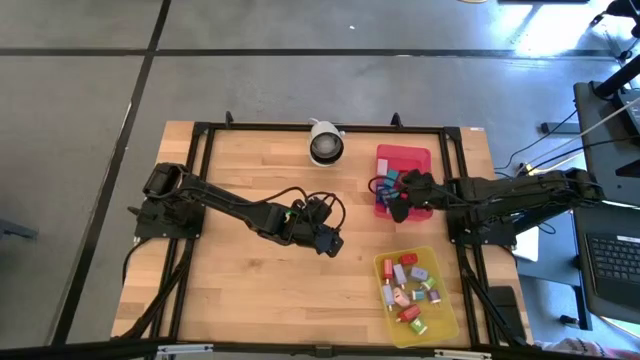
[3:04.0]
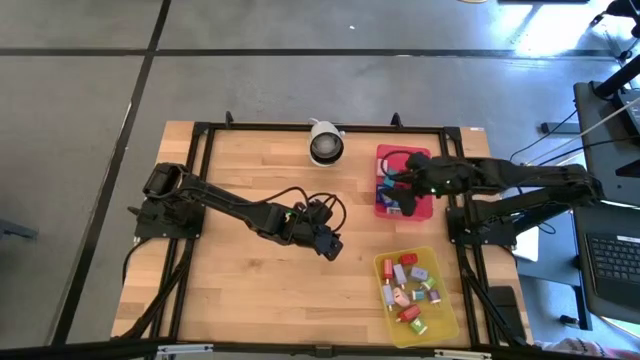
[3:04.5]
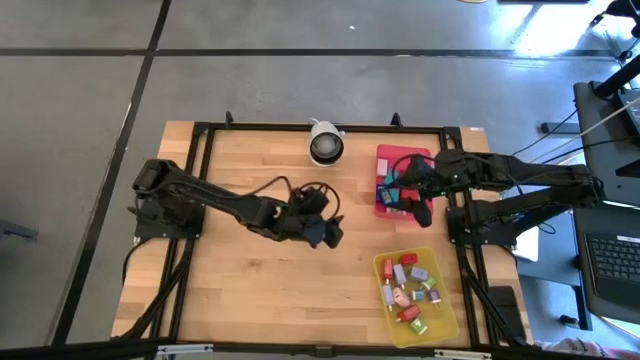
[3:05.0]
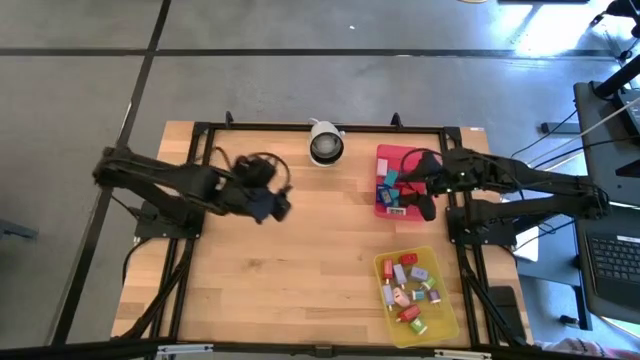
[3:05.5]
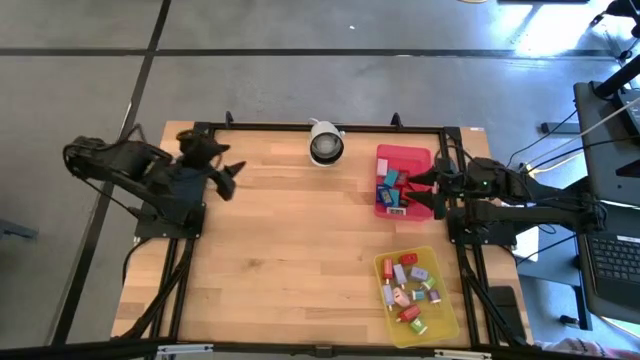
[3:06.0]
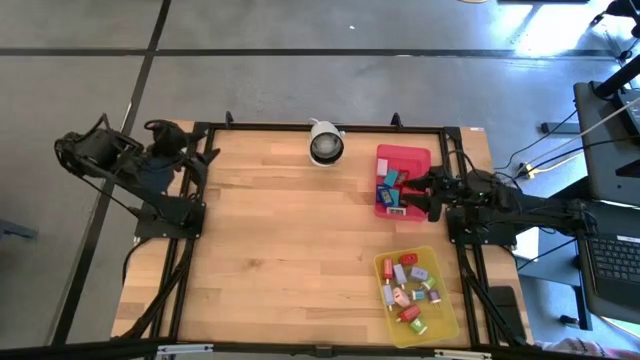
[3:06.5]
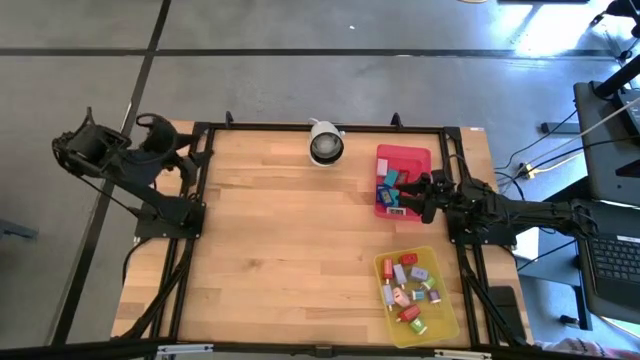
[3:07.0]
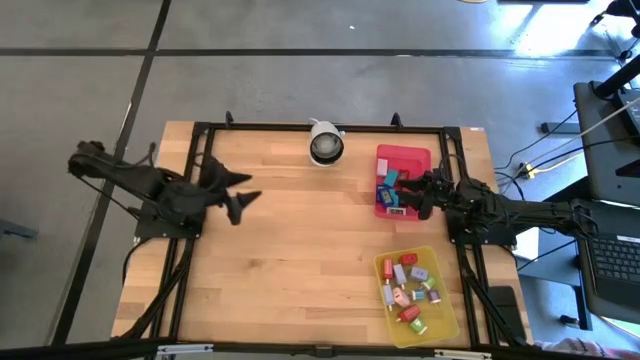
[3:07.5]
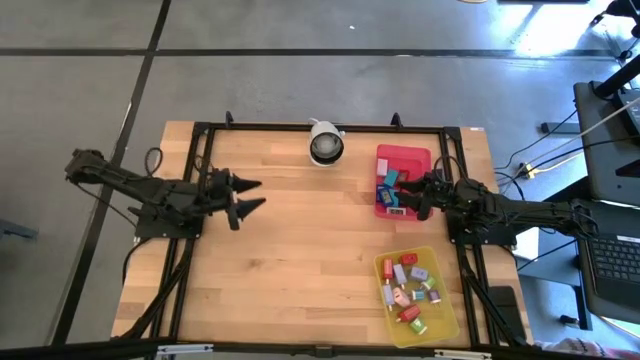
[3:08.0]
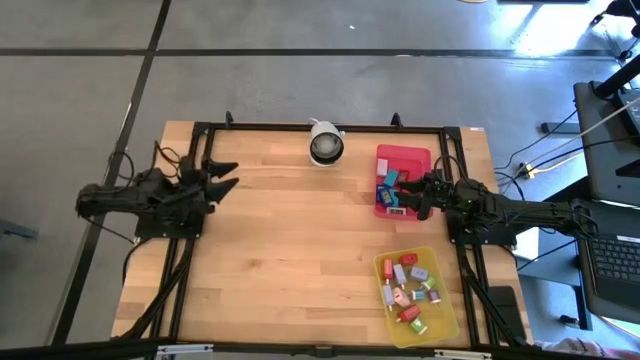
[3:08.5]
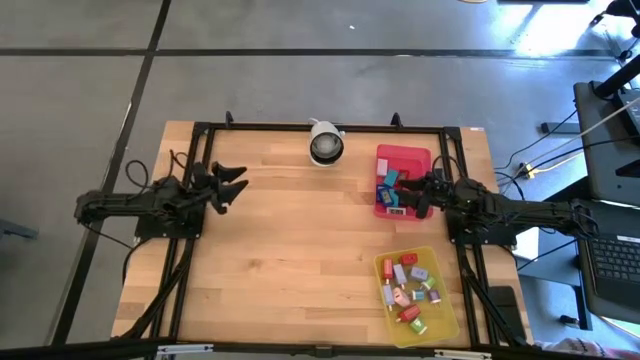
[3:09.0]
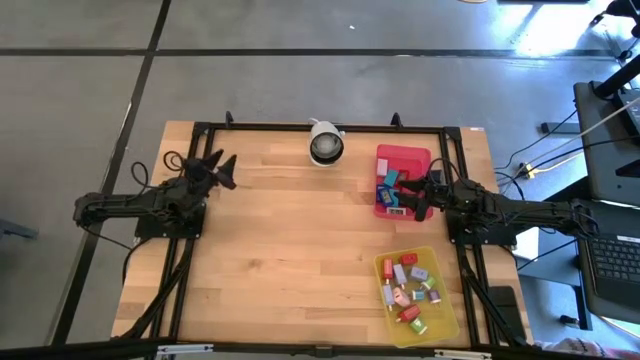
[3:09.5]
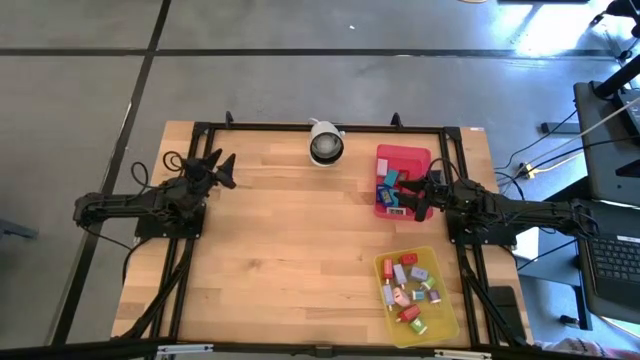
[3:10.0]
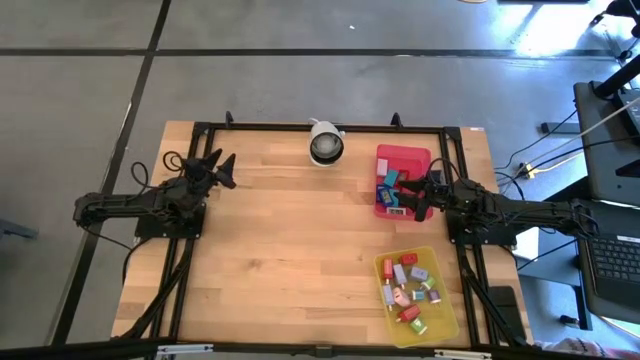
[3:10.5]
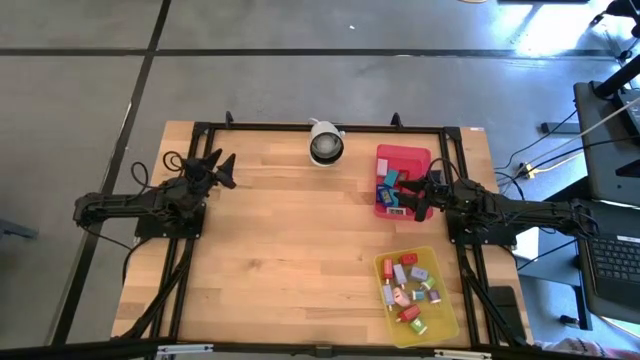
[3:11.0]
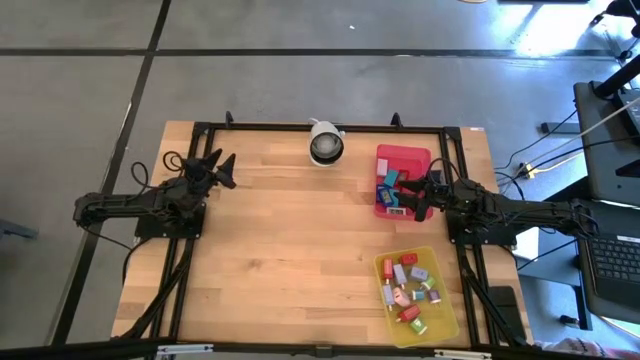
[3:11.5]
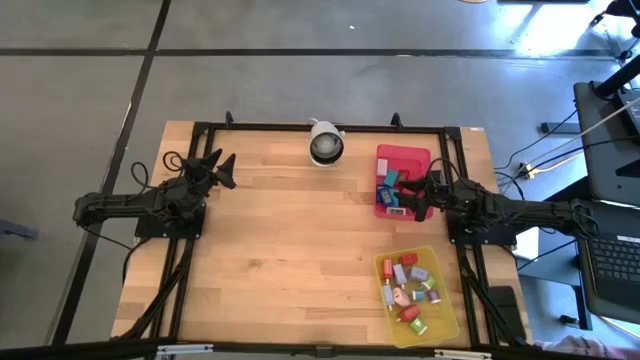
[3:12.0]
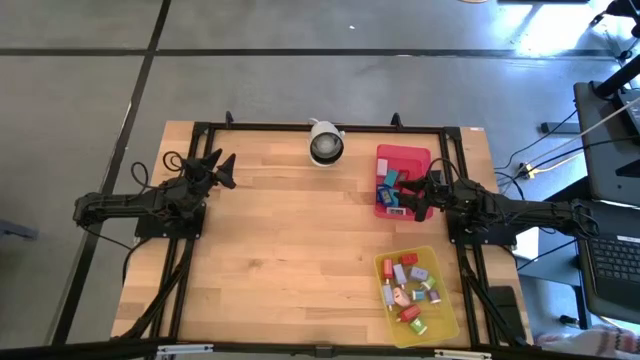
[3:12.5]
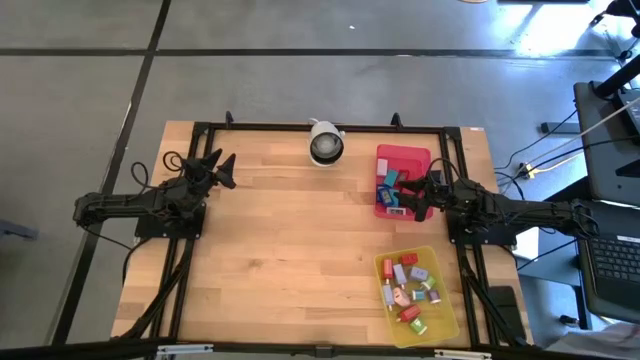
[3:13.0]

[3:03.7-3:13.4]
Task: Pick & Place Office items
Return to Home Position

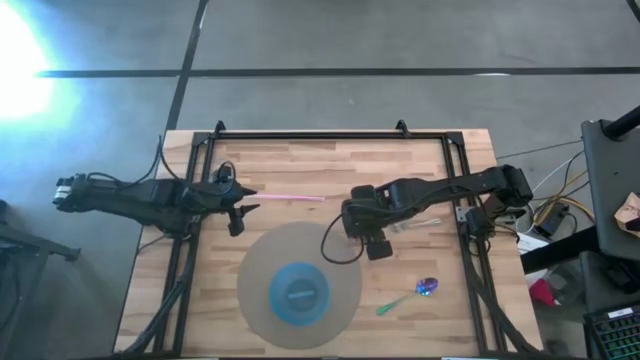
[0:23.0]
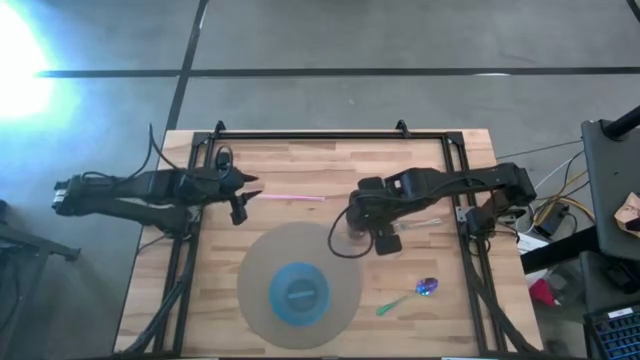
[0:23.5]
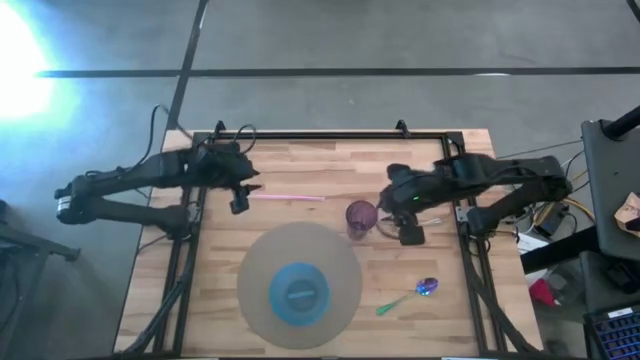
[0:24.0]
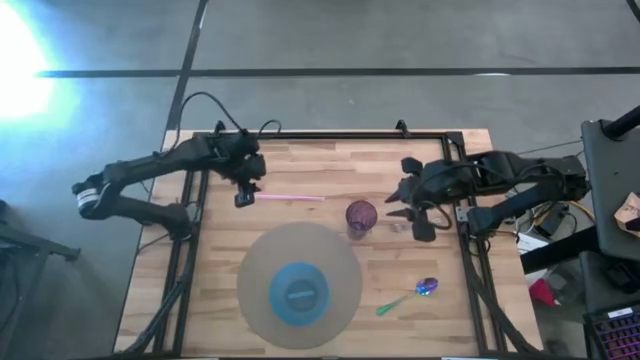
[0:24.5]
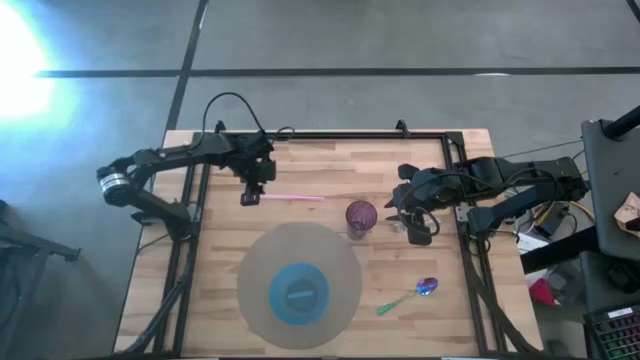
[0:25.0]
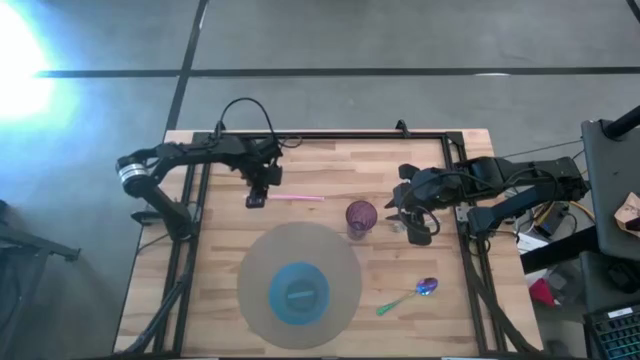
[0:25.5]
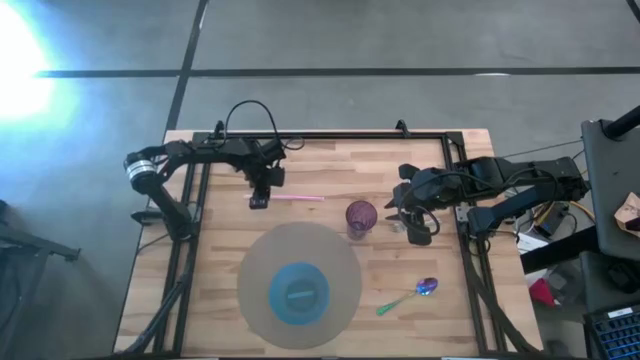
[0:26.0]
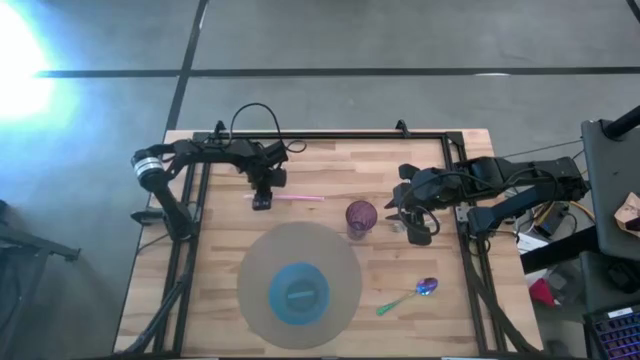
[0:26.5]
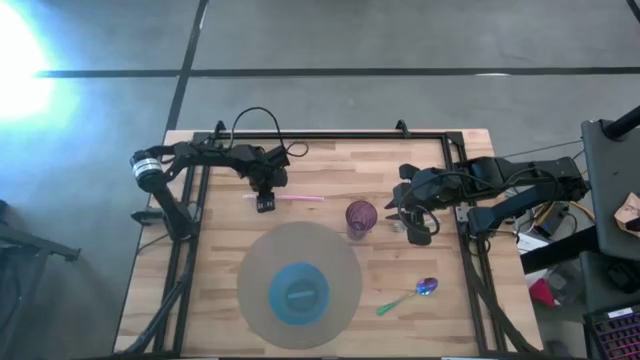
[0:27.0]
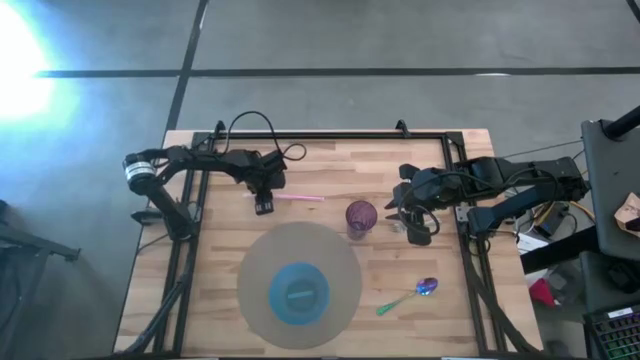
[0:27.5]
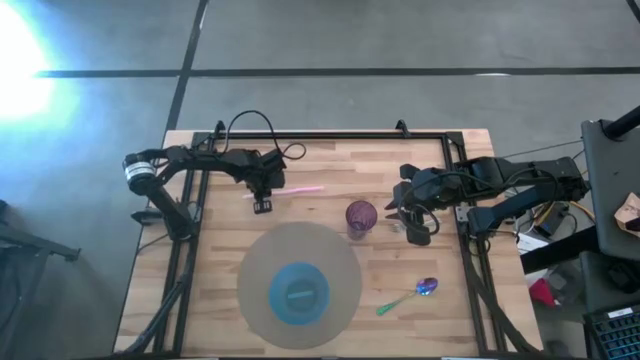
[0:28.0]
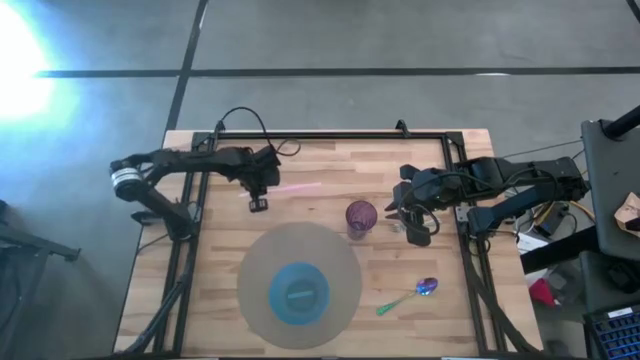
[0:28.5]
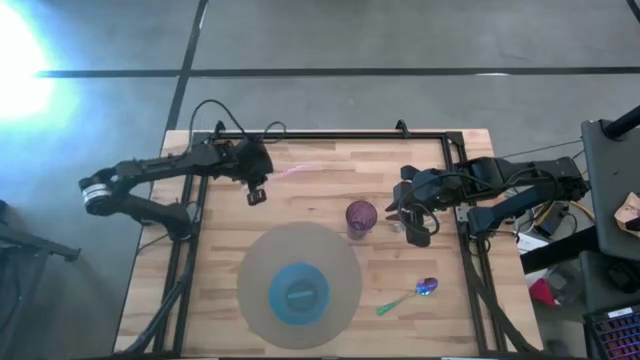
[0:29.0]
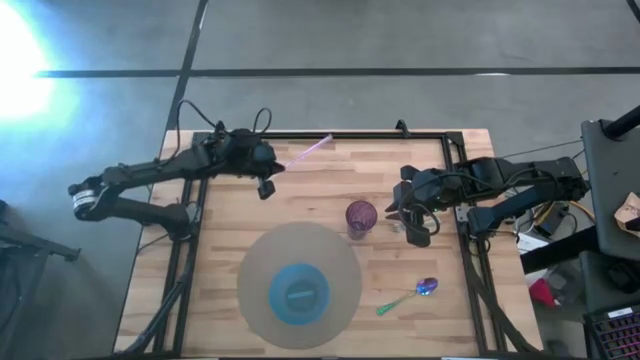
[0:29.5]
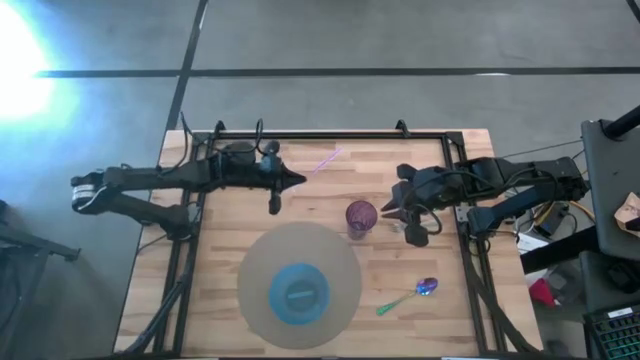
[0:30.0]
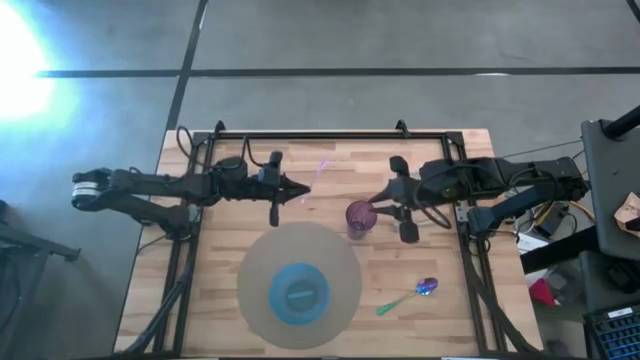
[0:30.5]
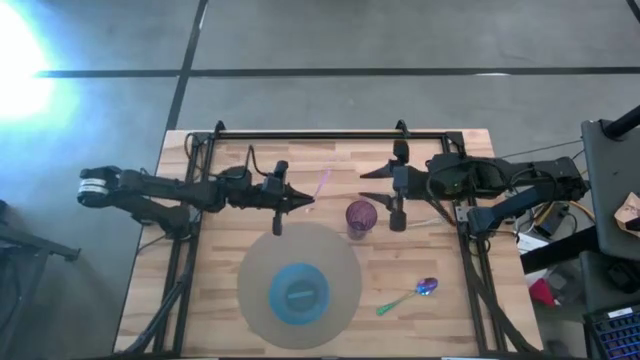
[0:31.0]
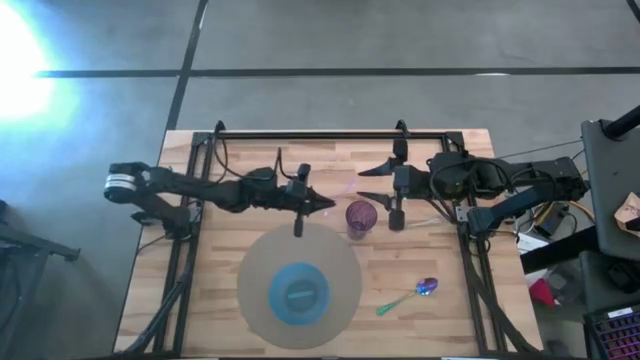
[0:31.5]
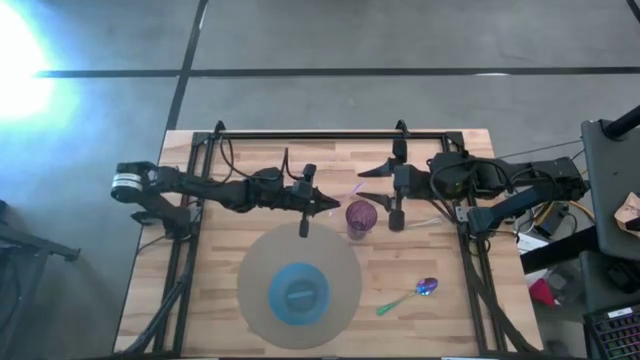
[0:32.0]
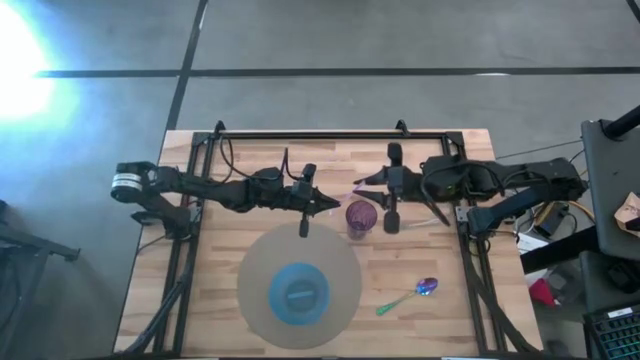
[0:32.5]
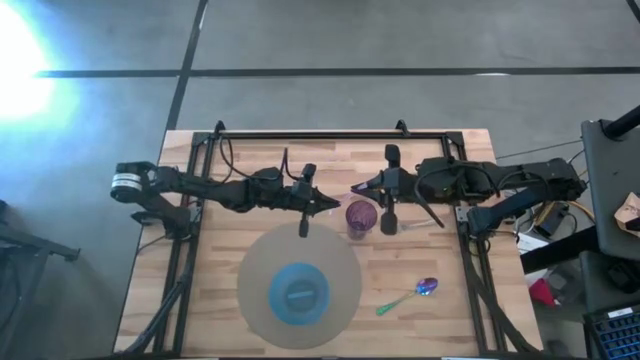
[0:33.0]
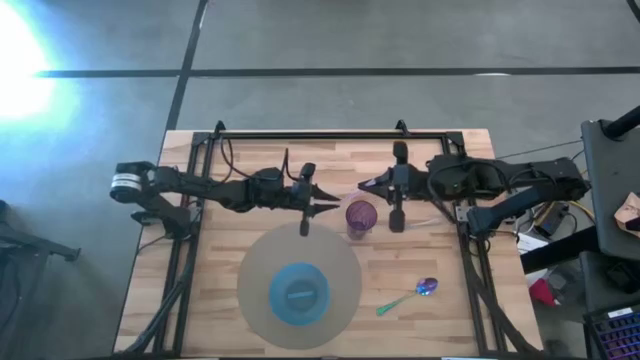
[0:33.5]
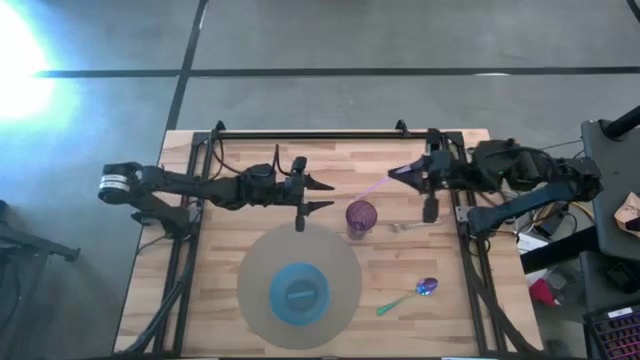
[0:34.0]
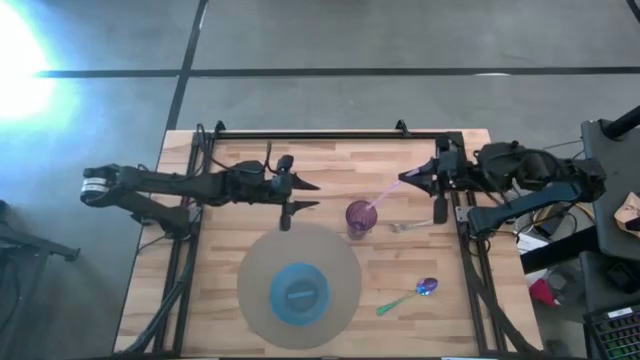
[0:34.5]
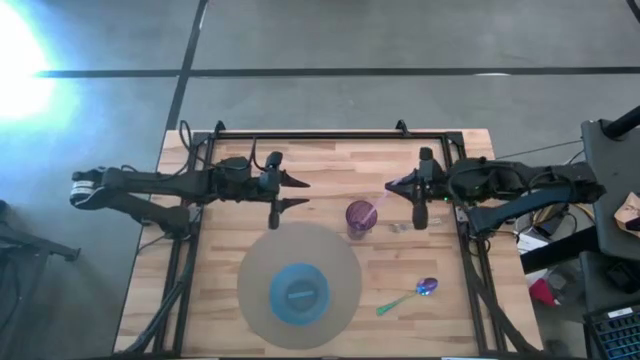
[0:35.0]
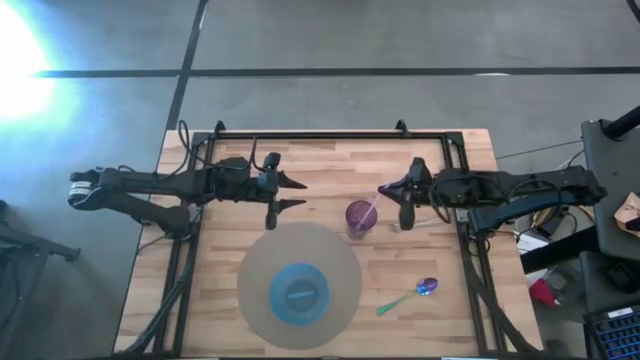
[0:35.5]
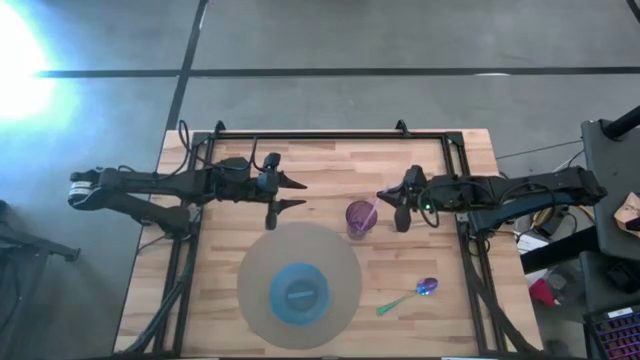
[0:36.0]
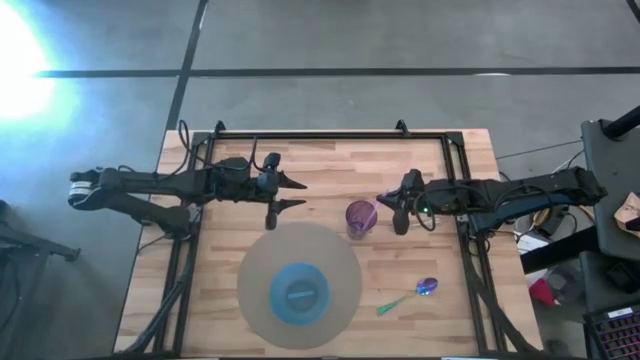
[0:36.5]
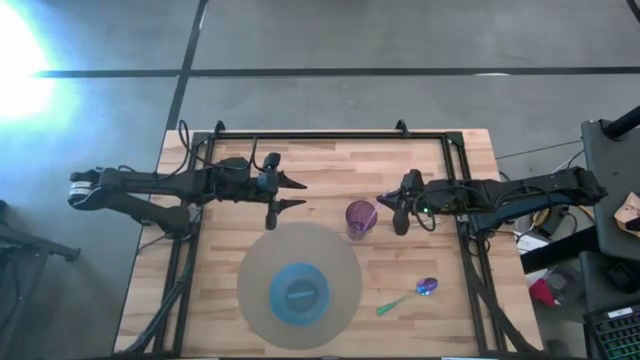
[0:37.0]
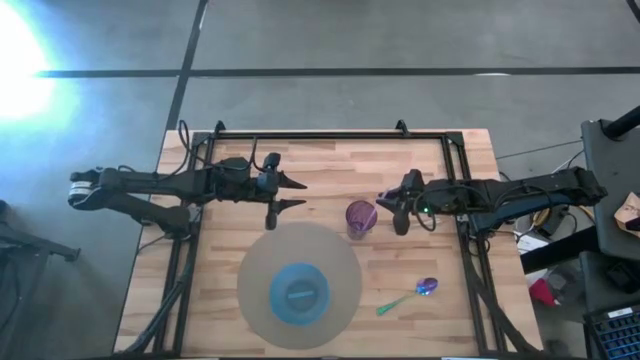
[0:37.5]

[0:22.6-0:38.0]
Task: Pick & Place Utensil
Put the pink straw into the purple cup
